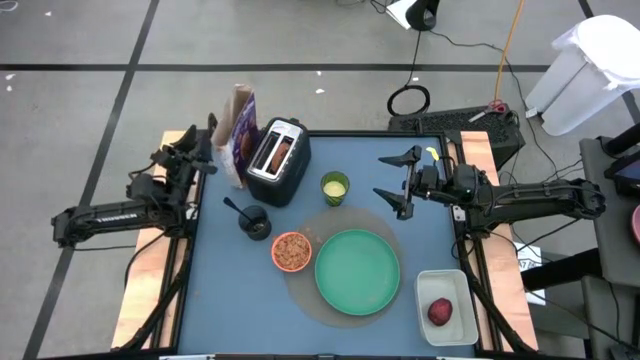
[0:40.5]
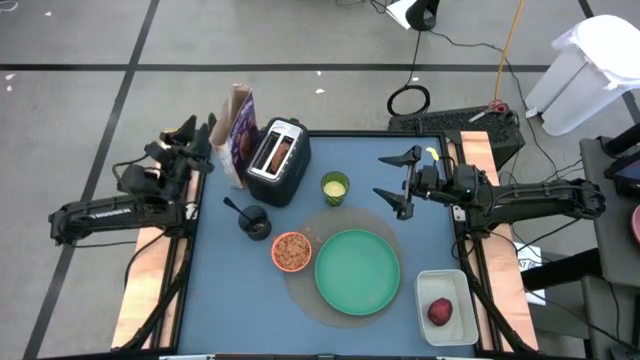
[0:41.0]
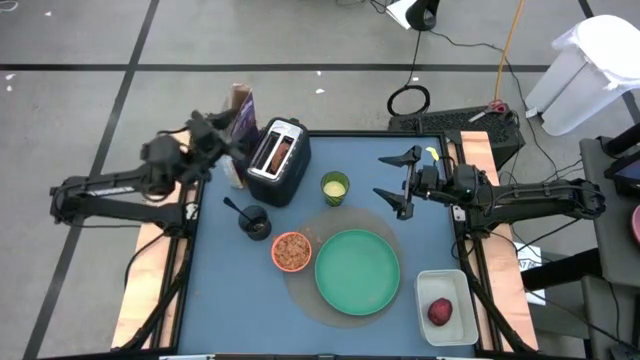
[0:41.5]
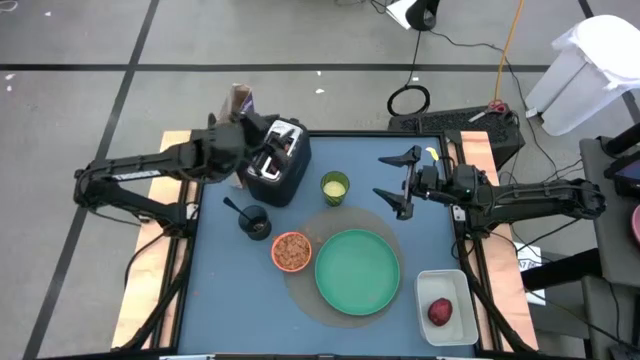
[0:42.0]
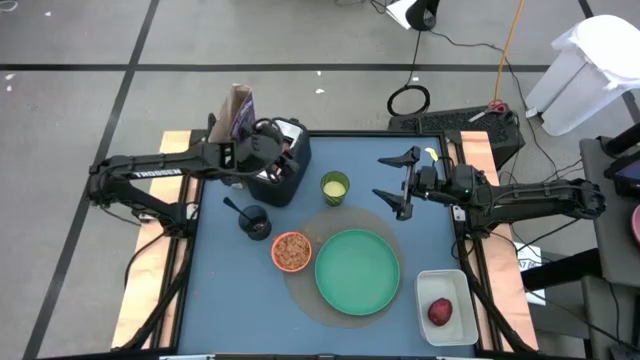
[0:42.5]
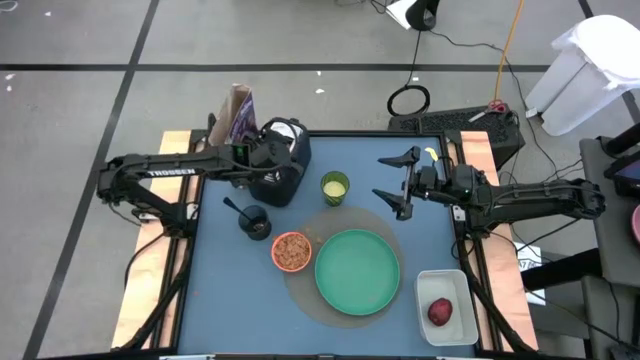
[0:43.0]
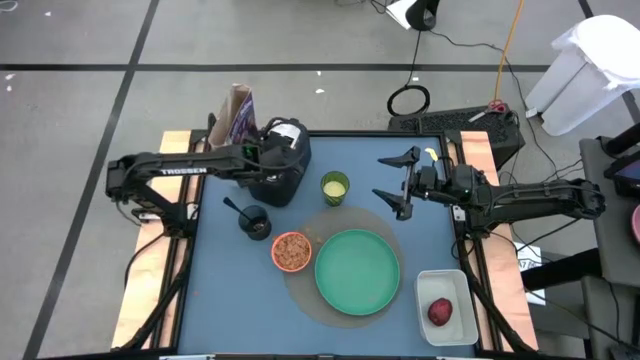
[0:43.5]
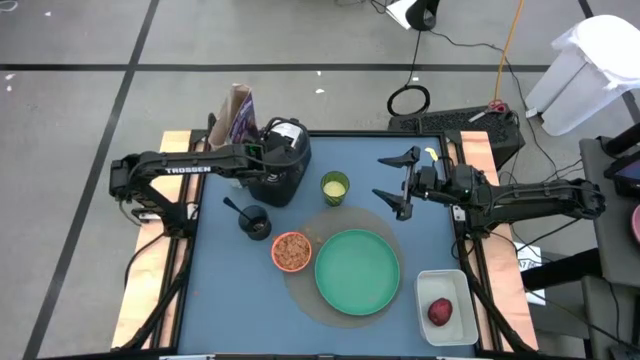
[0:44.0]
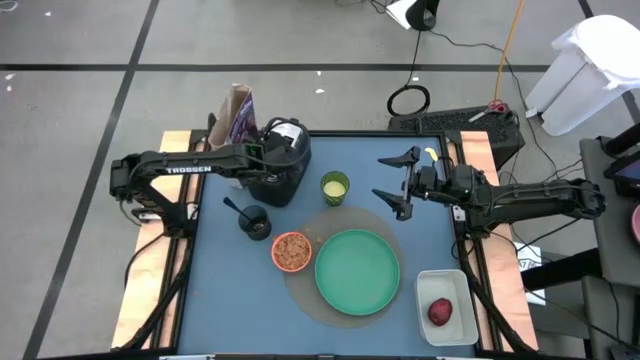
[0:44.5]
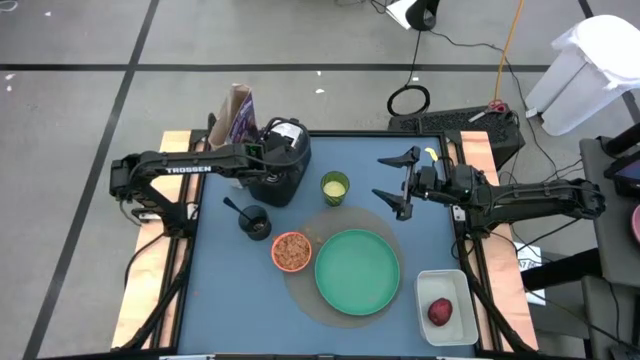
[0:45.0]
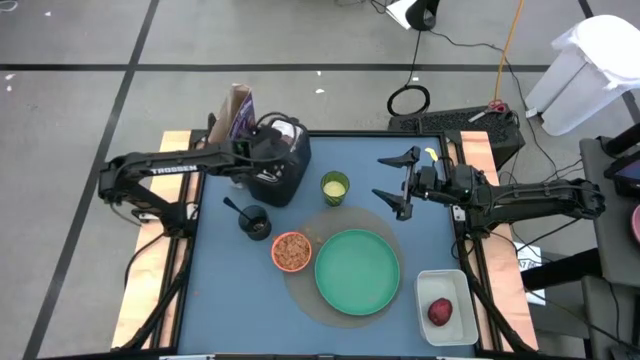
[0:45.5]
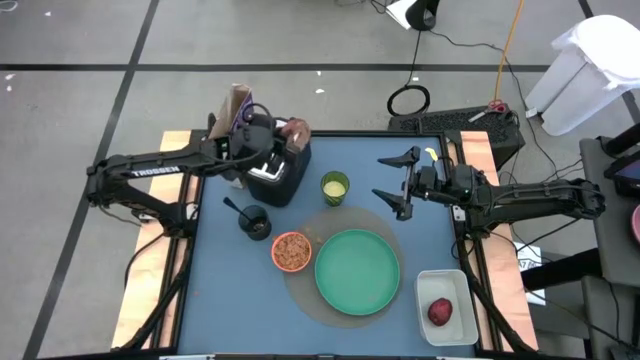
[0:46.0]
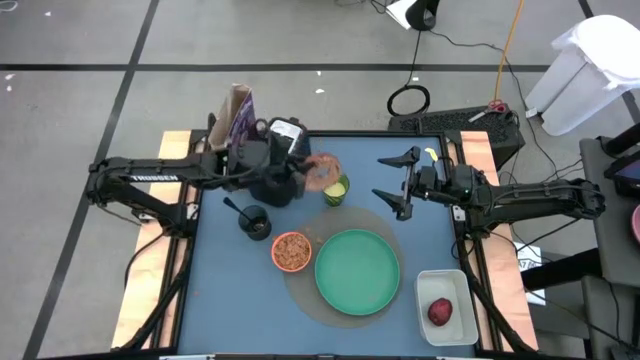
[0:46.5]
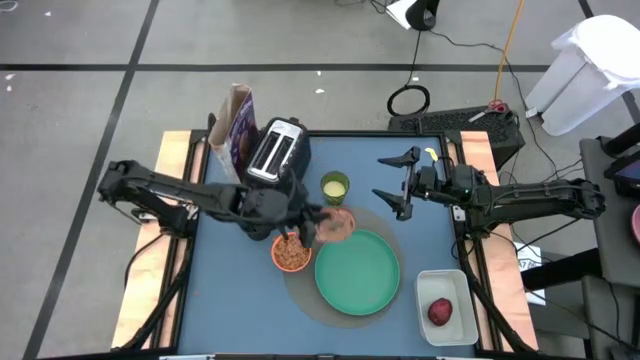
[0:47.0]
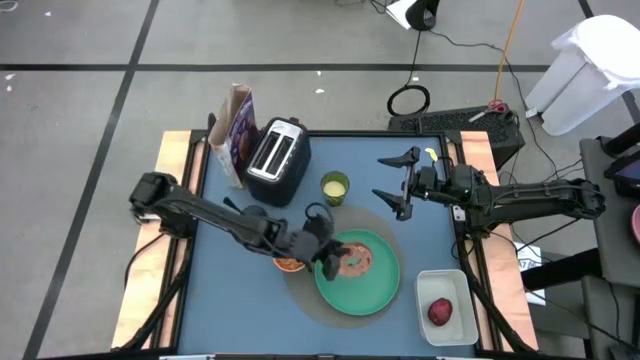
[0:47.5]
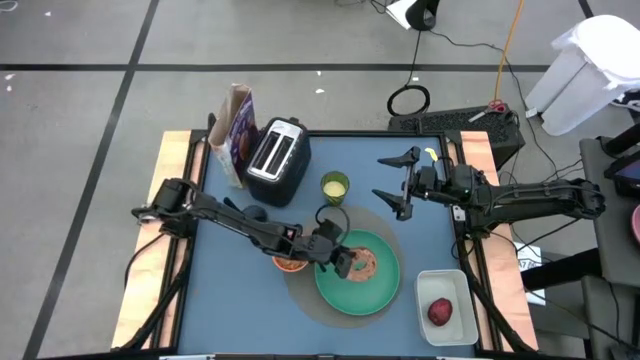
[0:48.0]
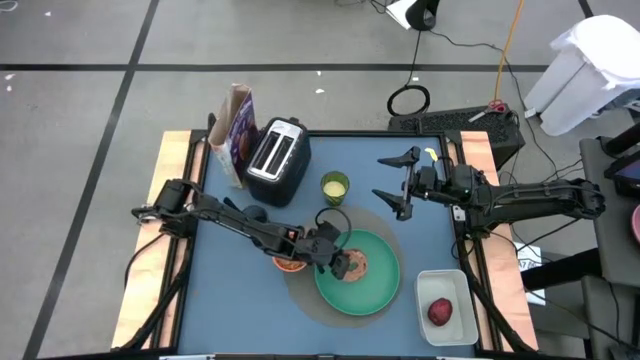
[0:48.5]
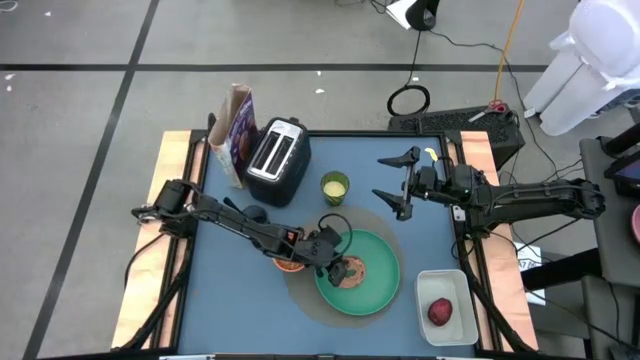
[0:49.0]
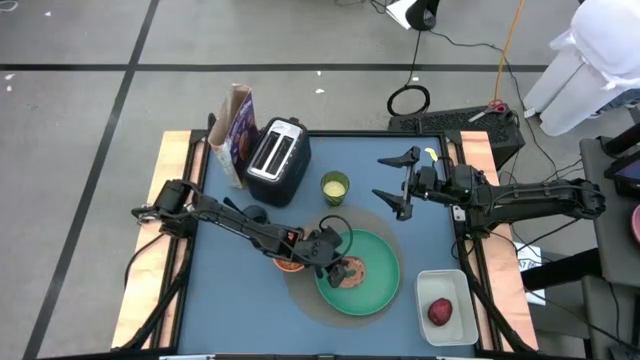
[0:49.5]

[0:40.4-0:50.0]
Task: Arrange a breakfast setting
Put the bagel on the green plate

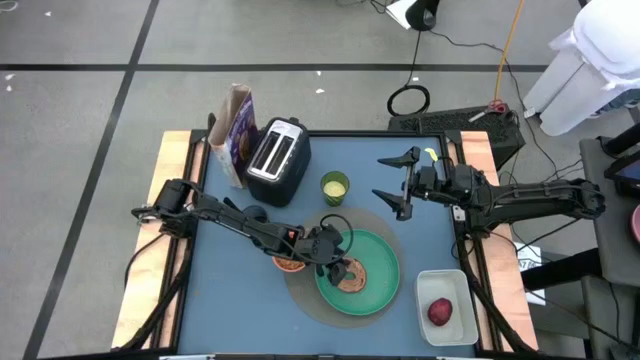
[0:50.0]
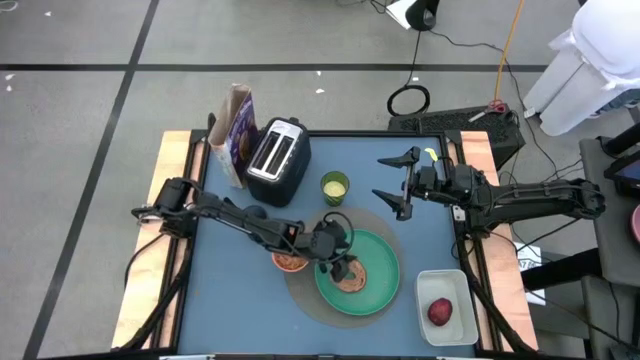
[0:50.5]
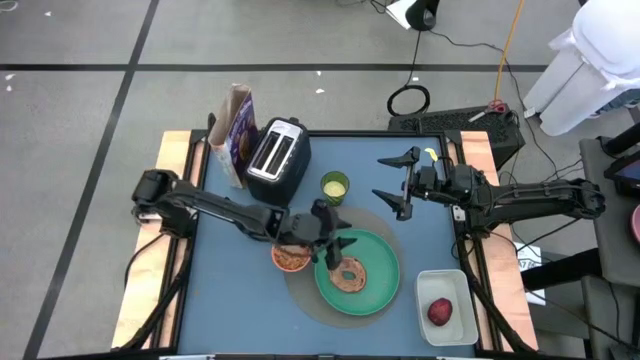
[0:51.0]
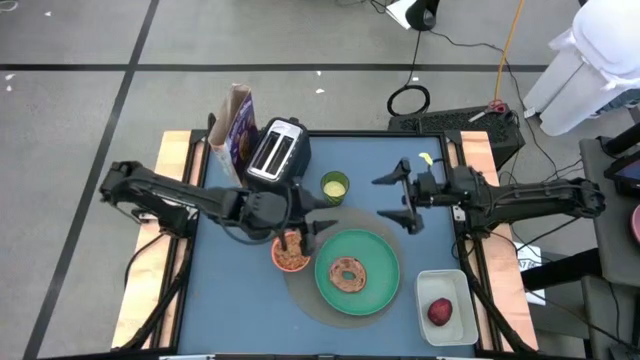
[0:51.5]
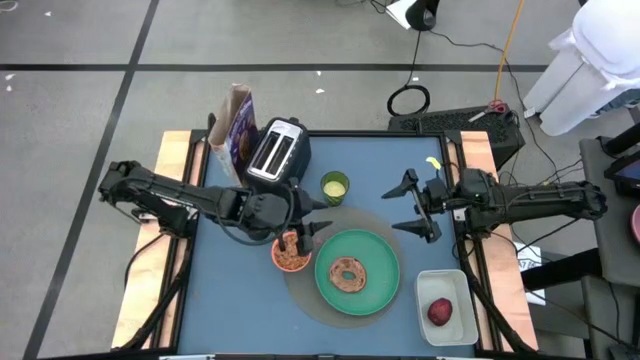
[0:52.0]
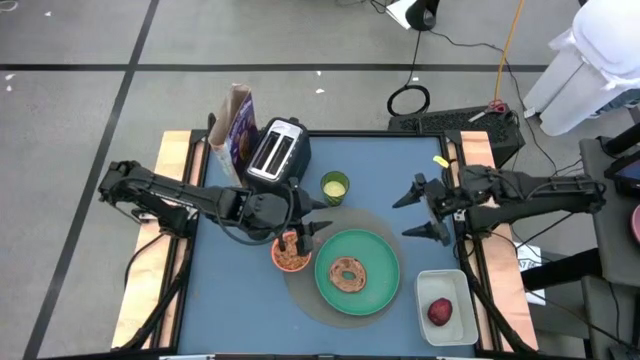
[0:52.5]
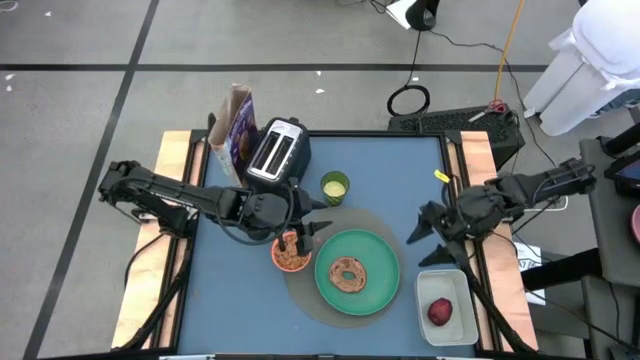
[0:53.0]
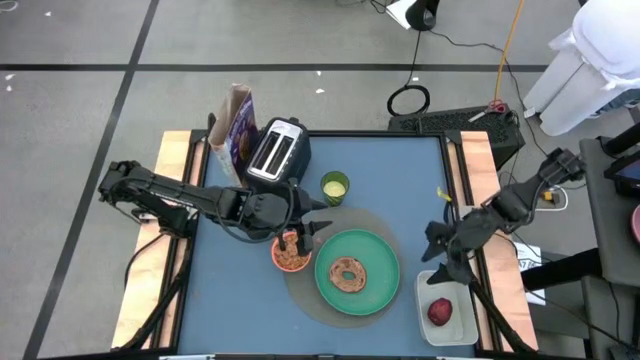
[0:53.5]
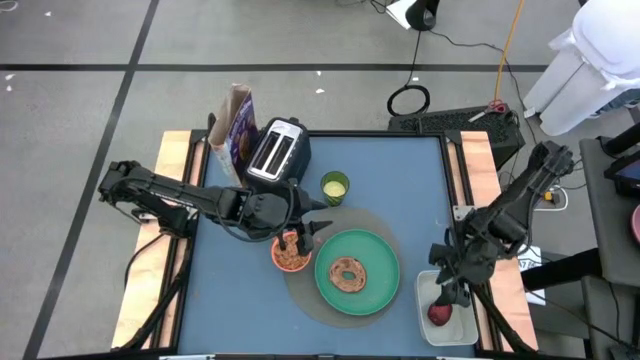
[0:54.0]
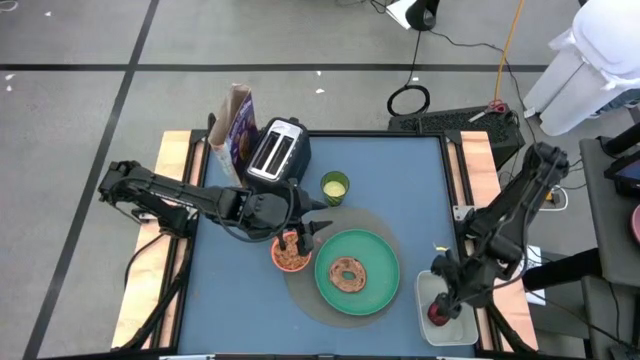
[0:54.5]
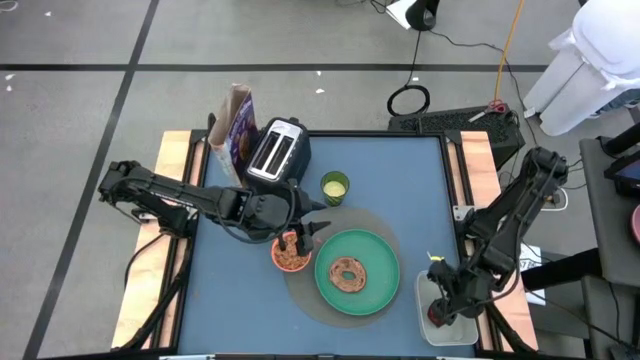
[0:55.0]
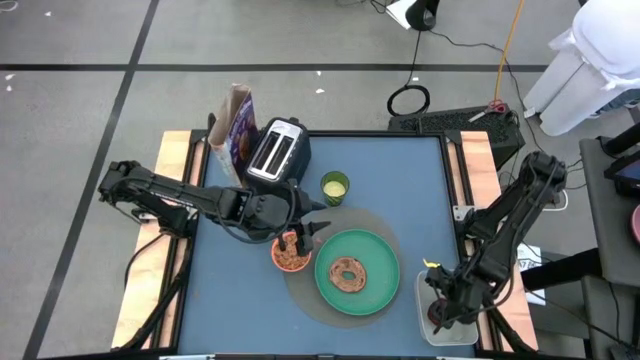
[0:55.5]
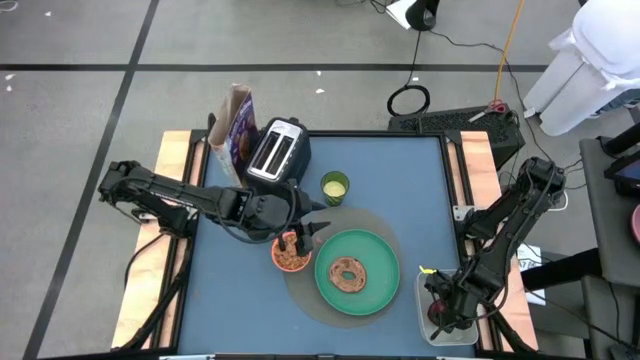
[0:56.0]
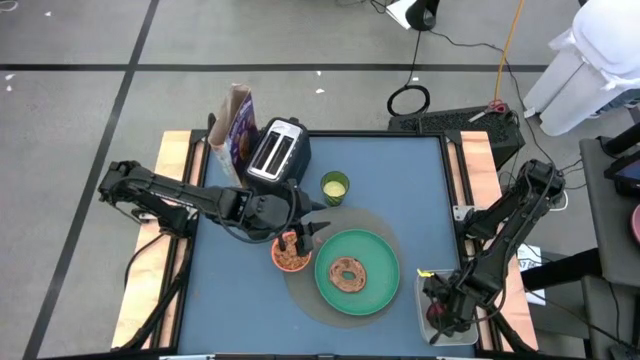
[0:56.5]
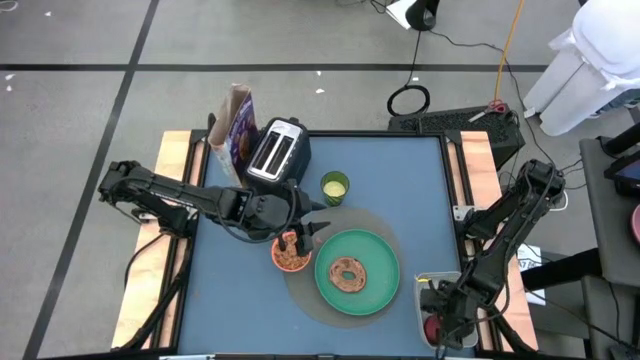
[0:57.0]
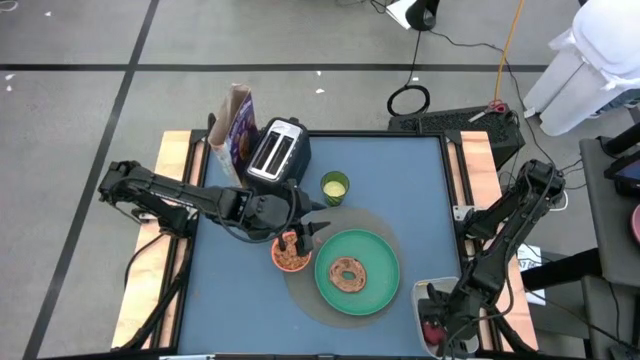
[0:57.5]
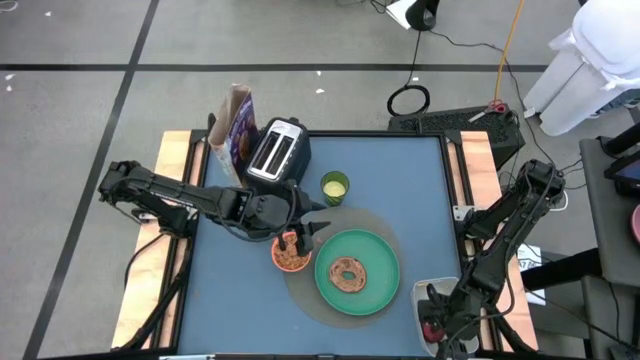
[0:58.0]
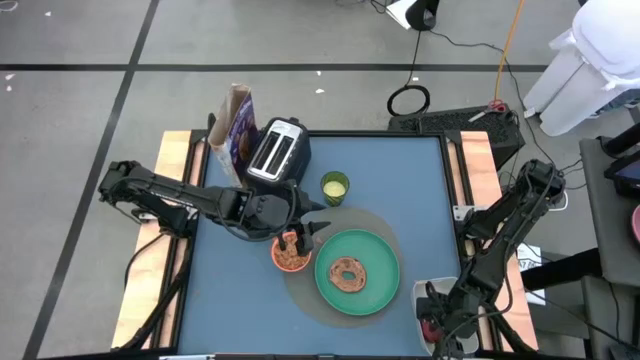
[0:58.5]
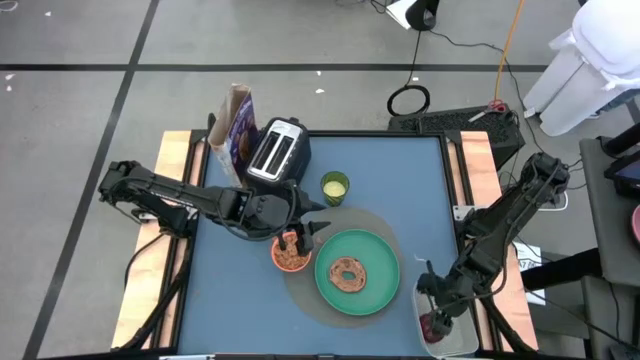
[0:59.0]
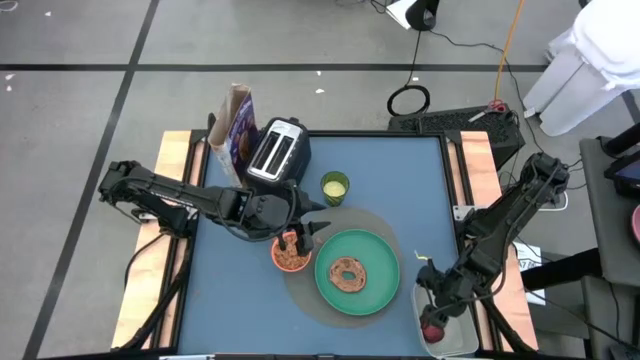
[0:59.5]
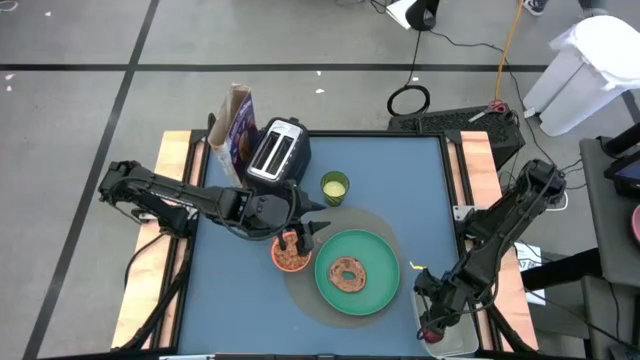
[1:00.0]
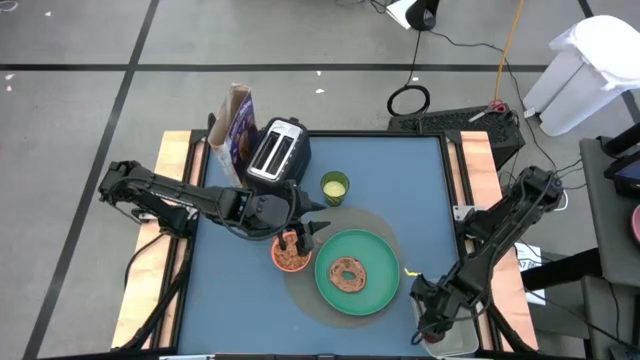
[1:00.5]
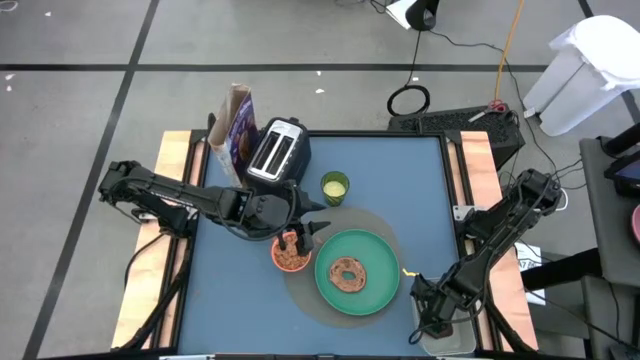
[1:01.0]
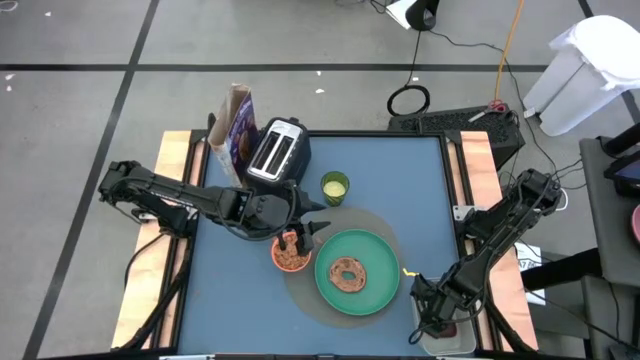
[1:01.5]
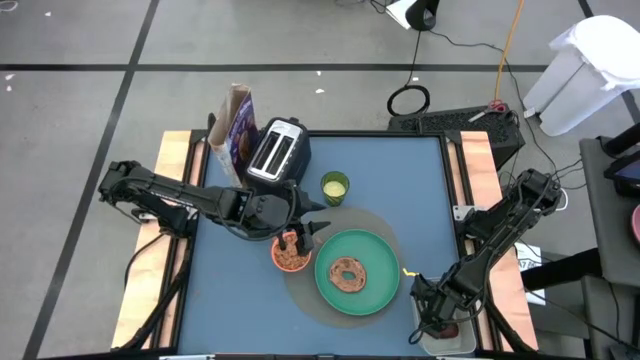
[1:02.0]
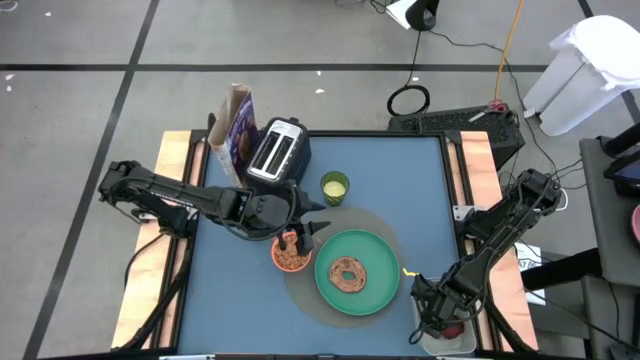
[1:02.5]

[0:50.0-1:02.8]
Put the apple on the gray table mat
